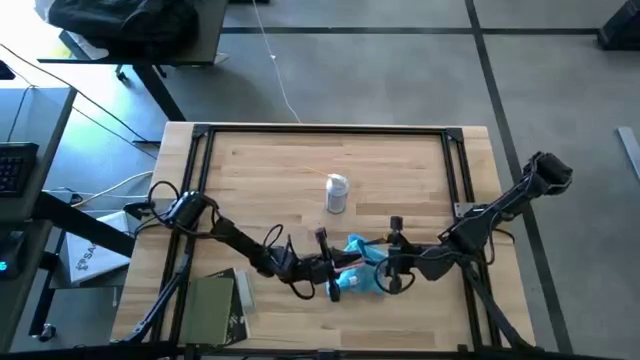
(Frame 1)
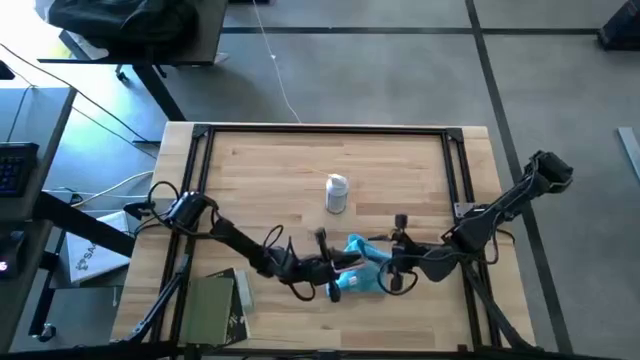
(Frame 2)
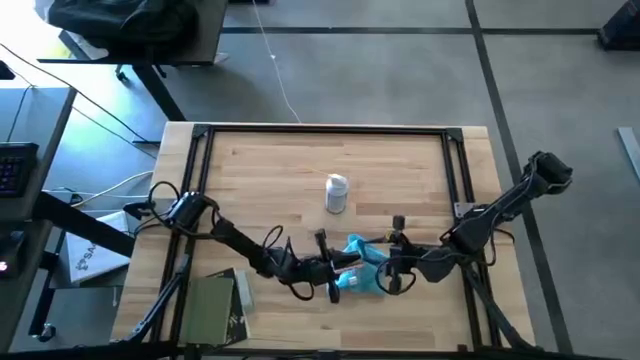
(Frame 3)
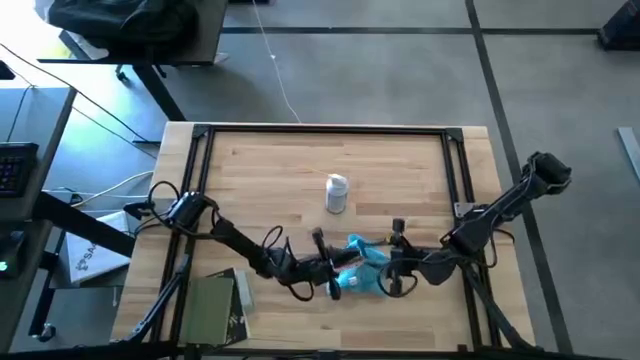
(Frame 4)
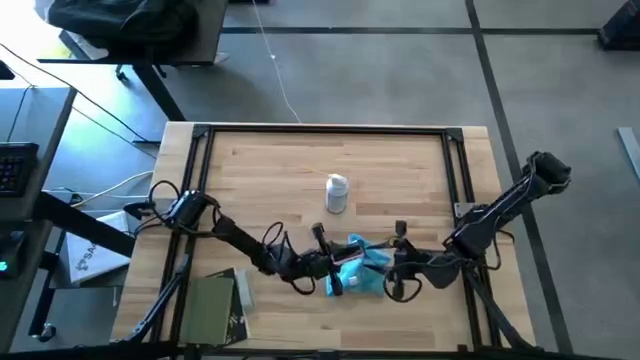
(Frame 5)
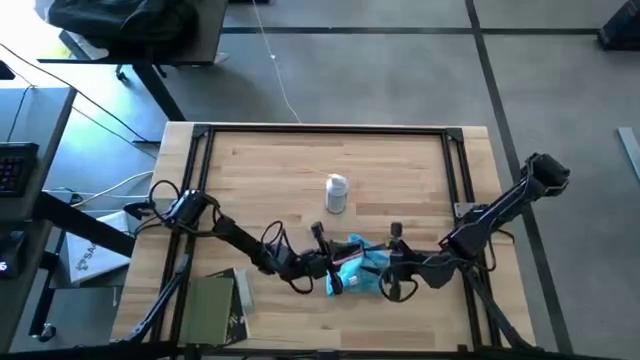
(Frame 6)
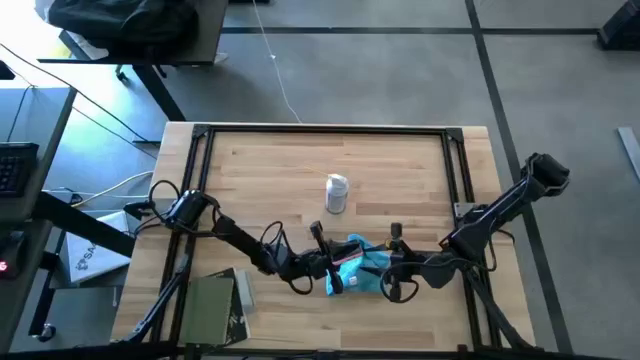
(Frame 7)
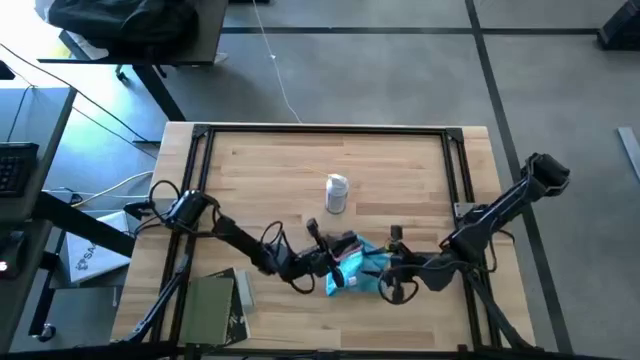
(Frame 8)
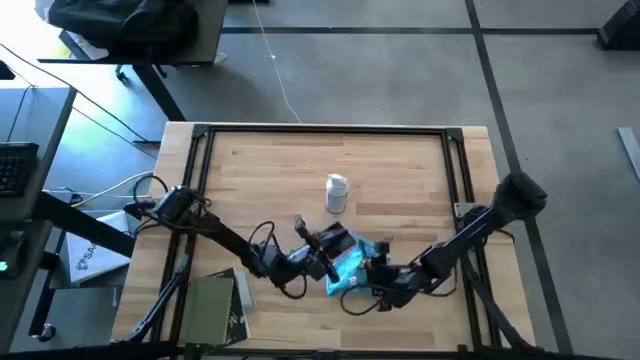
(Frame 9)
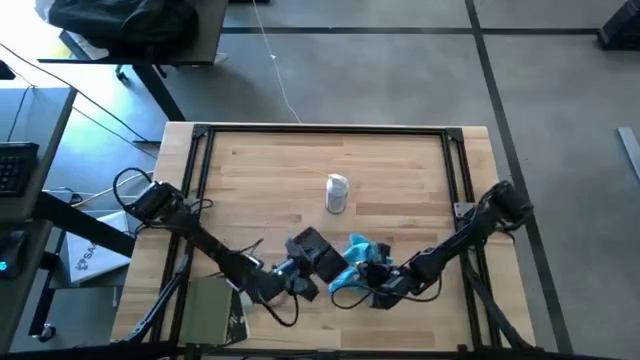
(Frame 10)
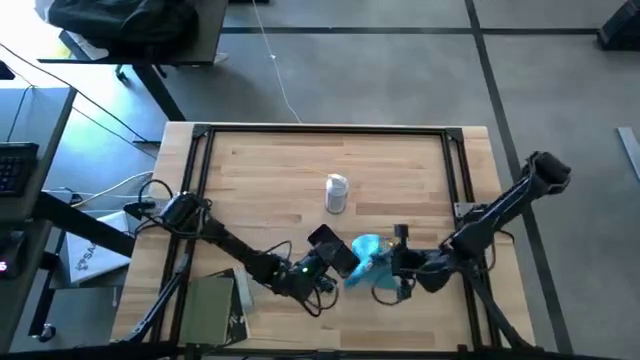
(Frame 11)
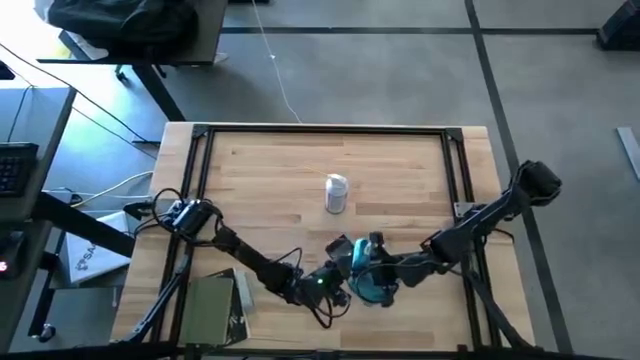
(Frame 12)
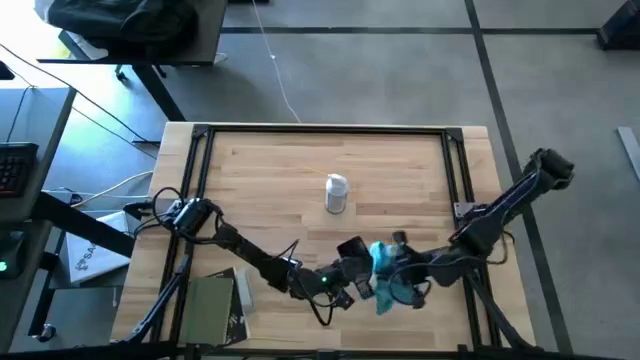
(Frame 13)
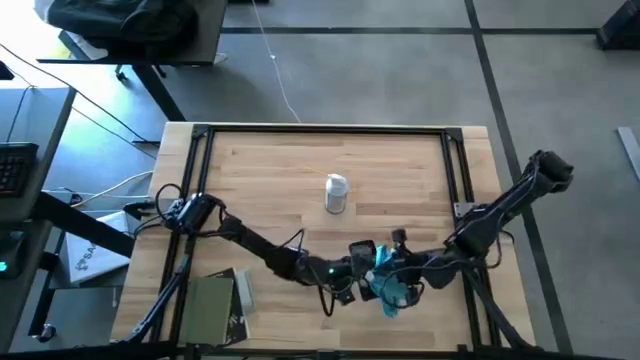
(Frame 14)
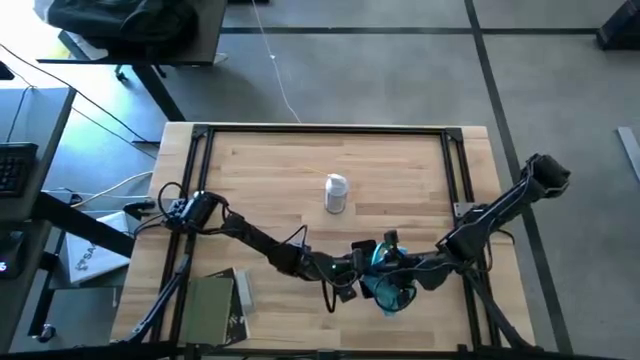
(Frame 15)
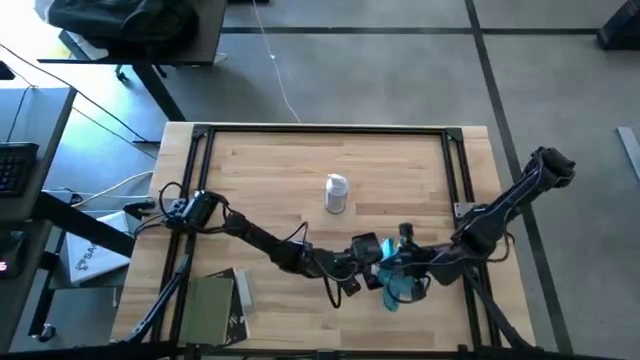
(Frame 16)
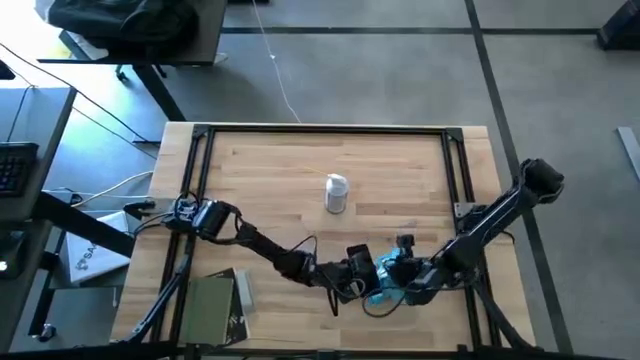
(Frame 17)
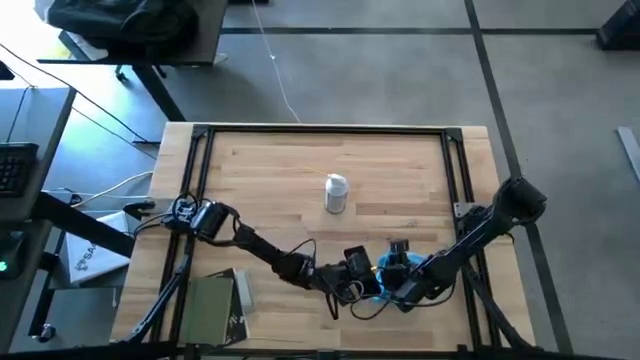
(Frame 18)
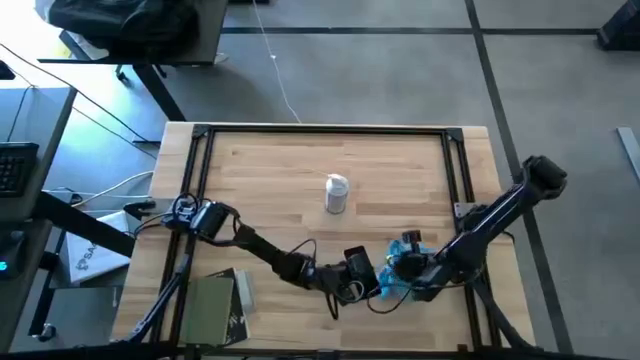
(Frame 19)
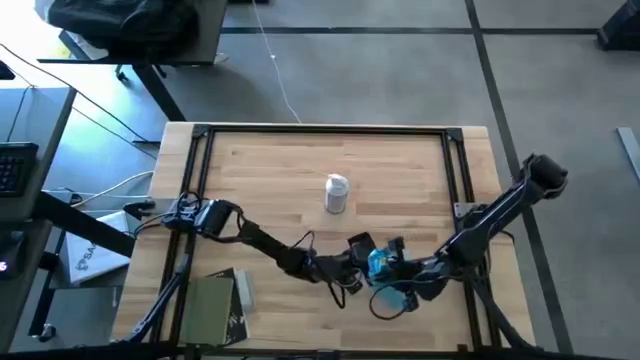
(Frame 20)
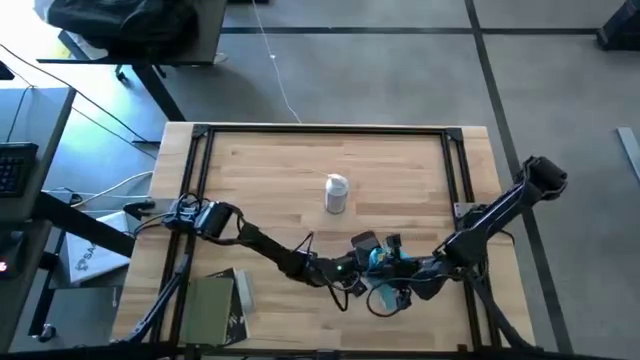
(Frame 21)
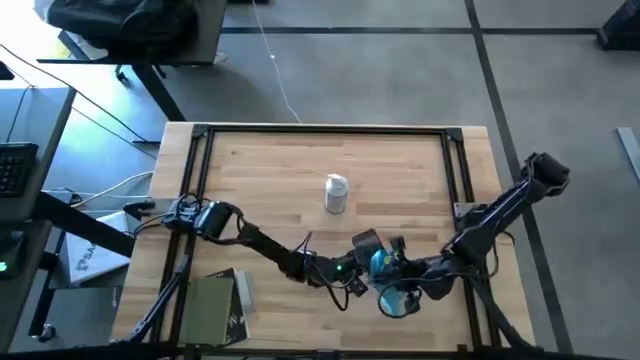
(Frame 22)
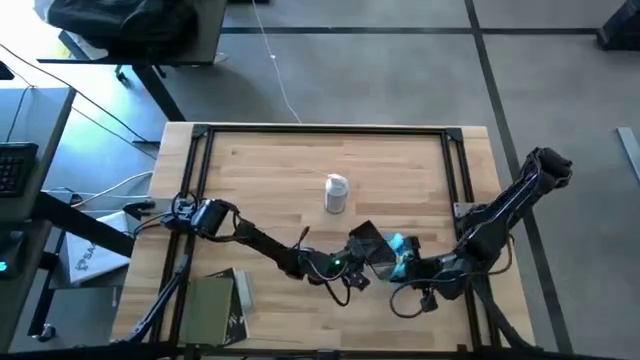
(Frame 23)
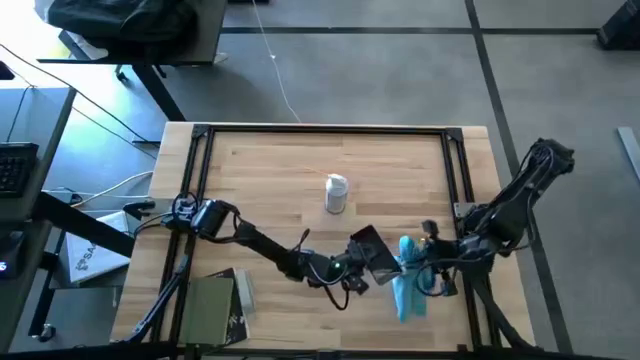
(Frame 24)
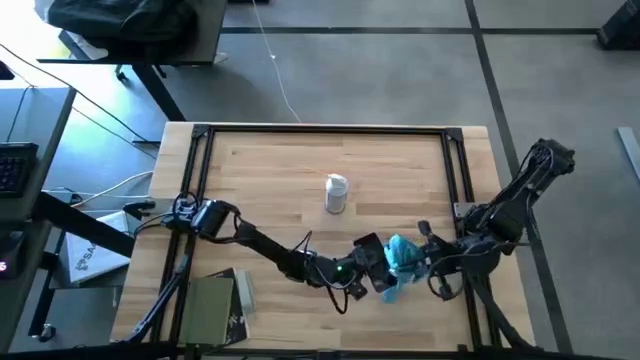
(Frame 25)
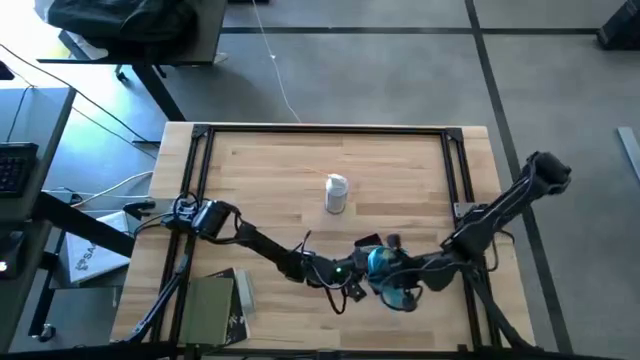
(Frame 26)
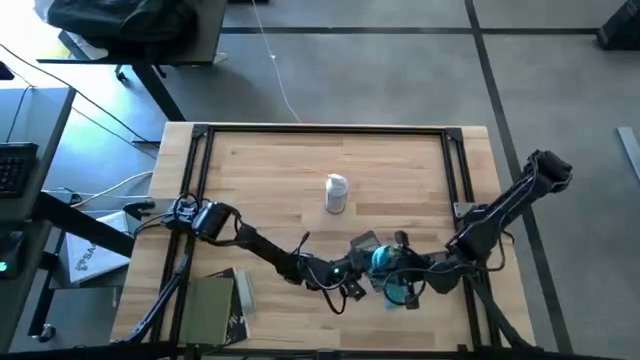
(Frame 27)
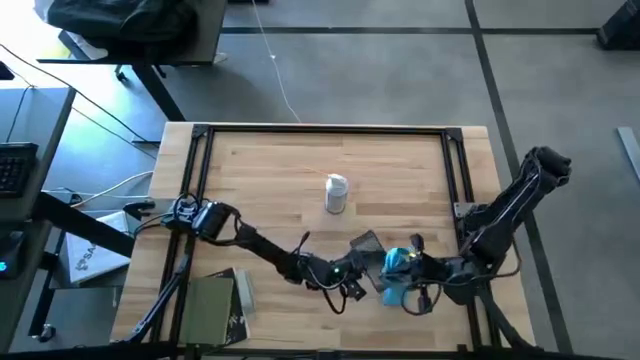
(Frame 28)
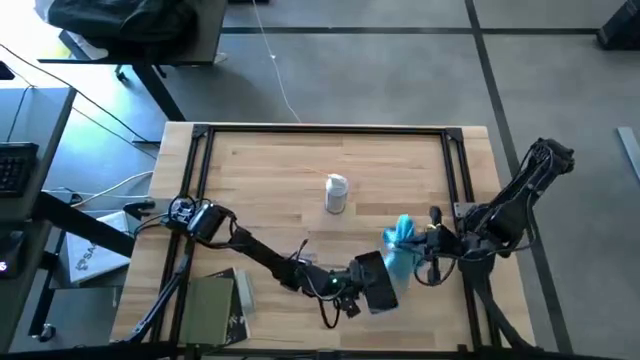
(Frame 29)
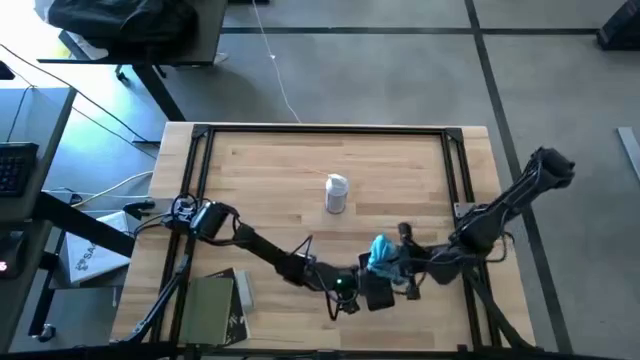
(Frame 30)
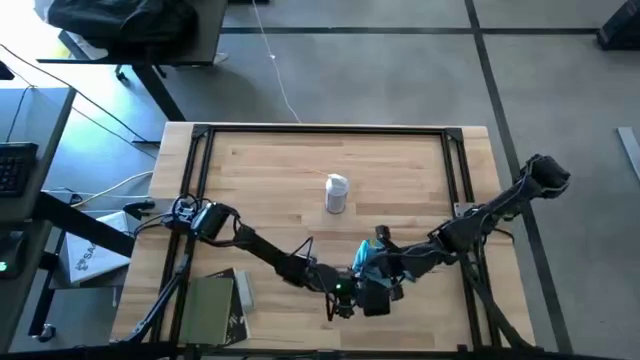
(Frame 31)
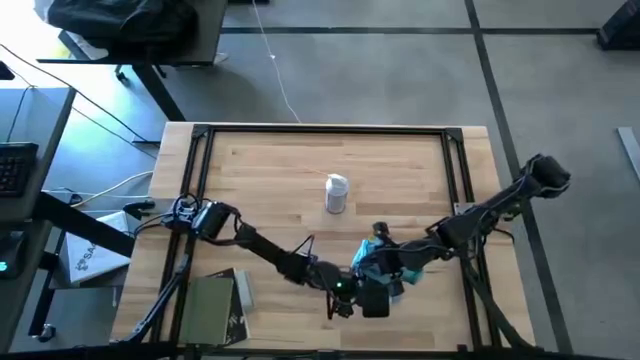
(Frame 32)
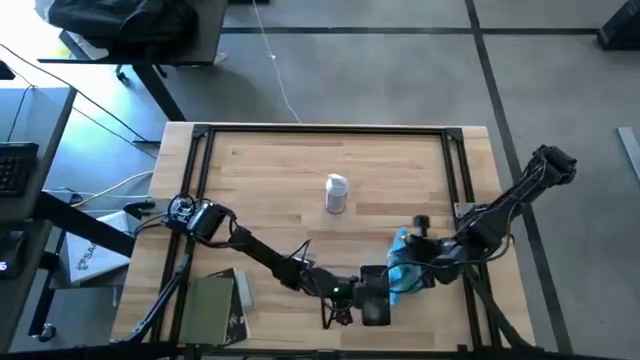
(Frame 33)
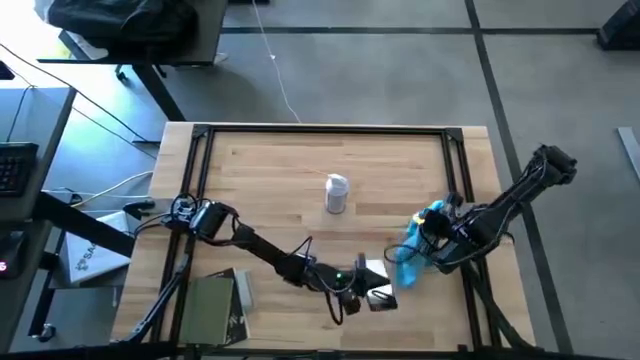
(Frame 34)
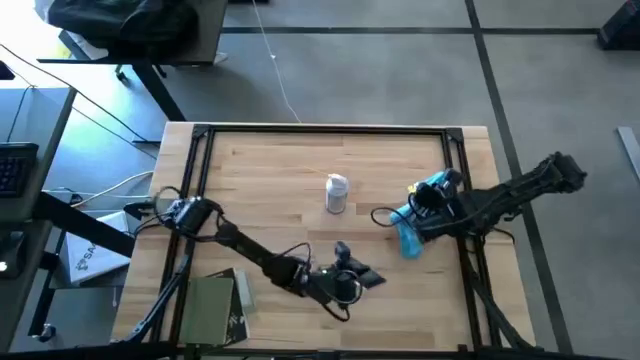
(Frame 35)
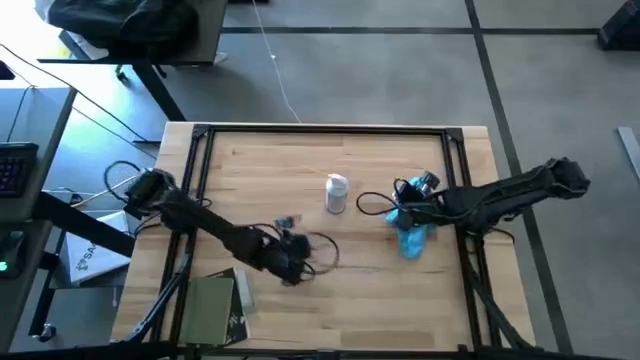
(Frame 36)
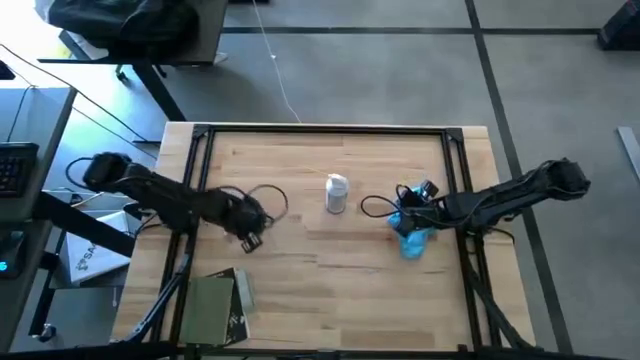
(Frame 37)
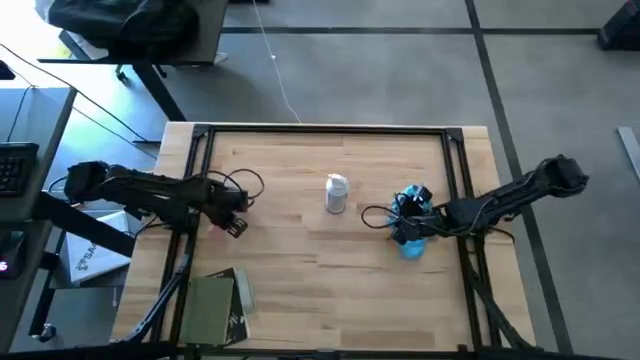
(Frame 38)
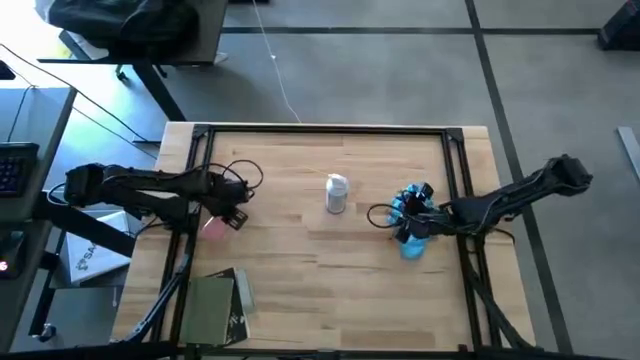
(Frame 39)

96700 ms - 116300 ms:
Task: Apply microfiber cloth
Wipe the pink cellphone with a blue microfiber cloth
